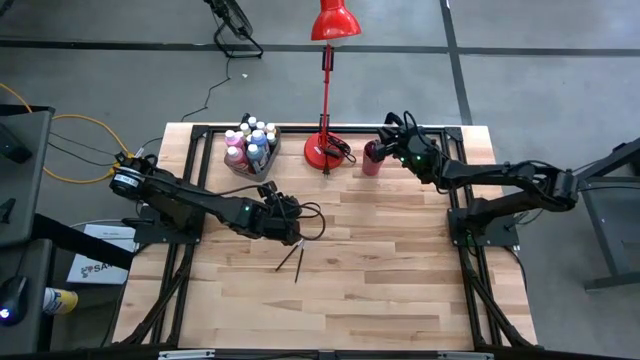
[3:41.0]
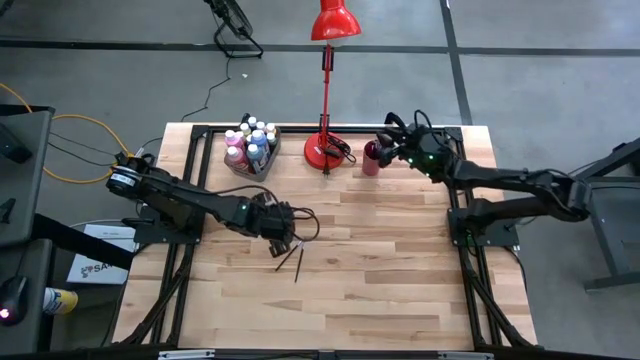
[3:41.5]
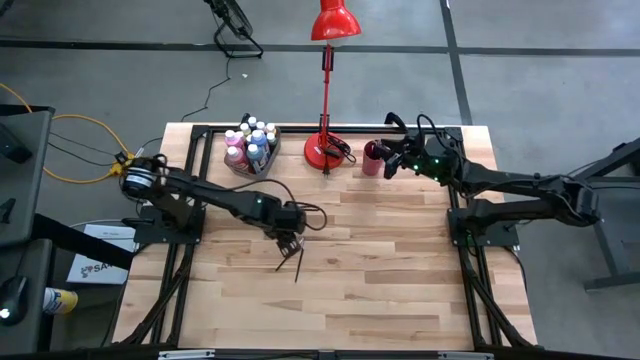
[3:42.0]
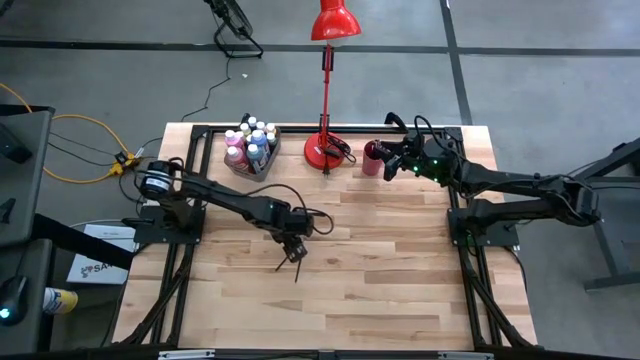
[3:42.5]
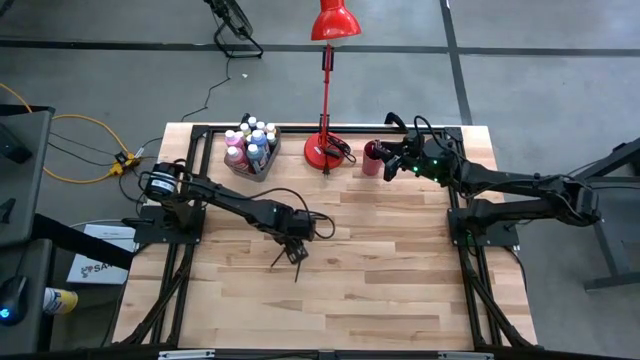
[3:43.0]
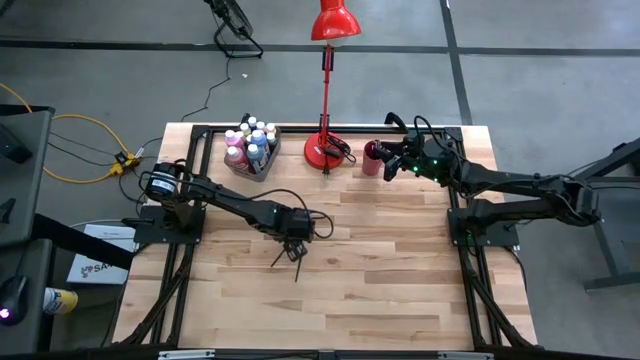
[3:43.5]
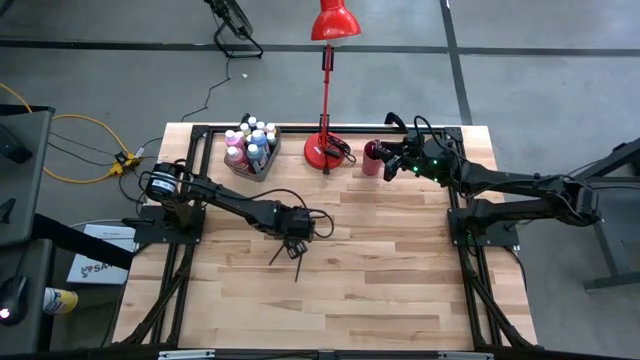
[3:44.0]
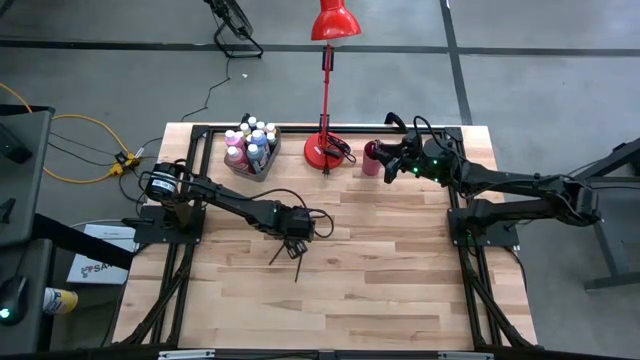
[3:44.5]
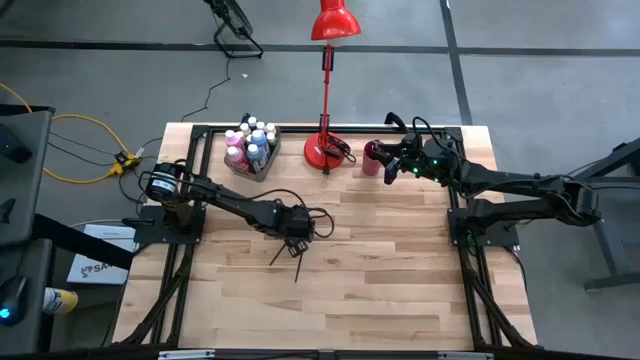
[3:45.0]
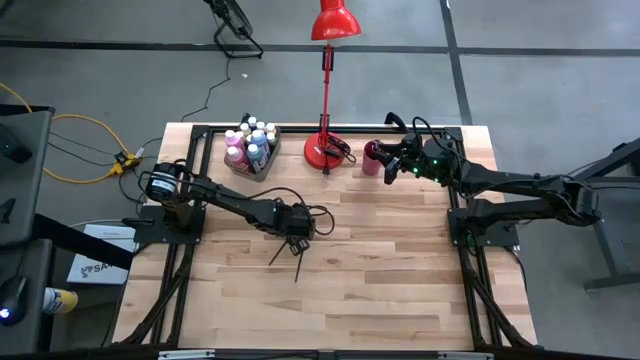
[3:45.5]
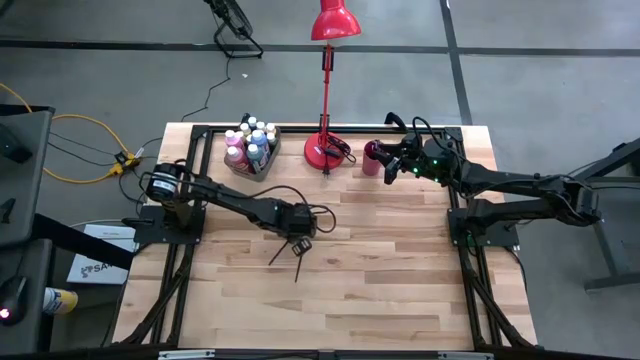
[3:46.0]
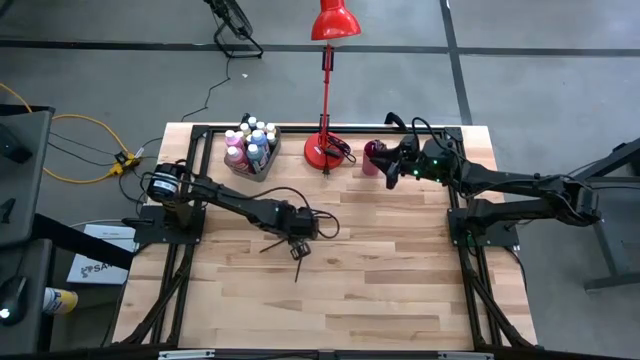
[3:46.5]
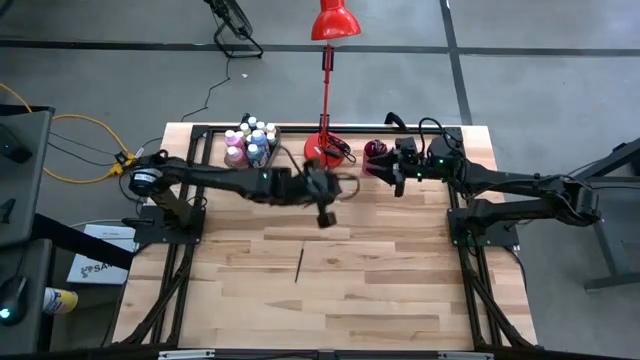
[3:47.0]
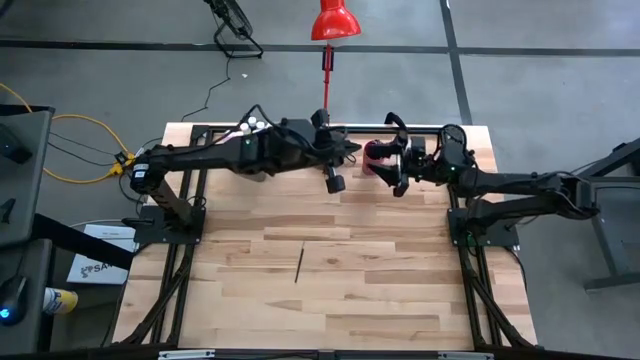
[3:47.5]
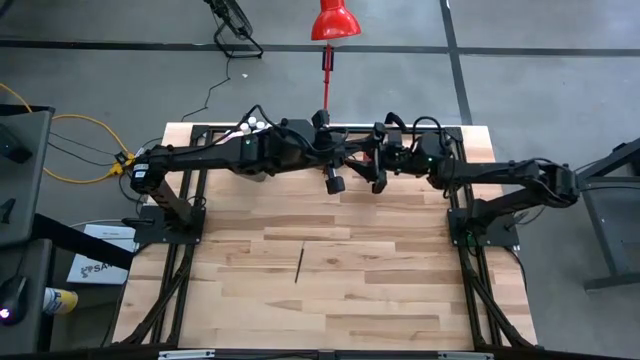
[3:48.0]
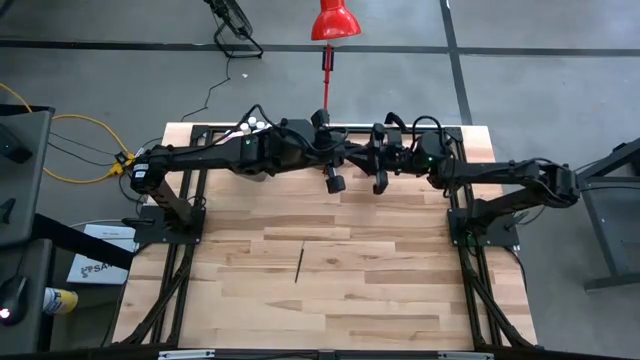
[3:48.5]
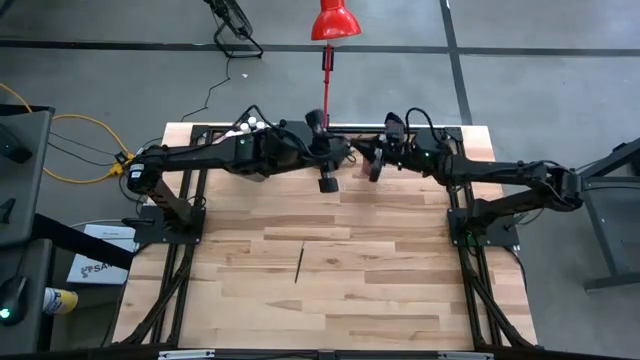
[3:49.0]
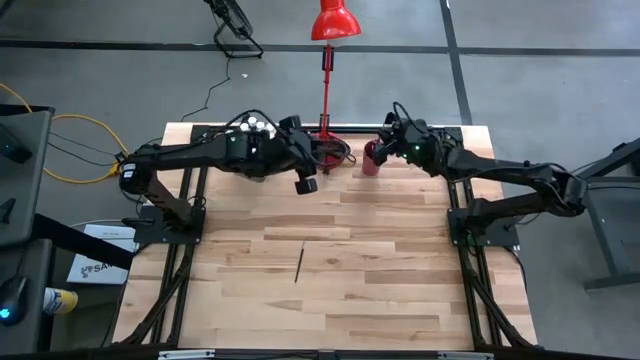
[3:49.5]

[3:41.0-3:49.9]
Task: Pick & Place Paint Supplies
Put the paint brush into the cup

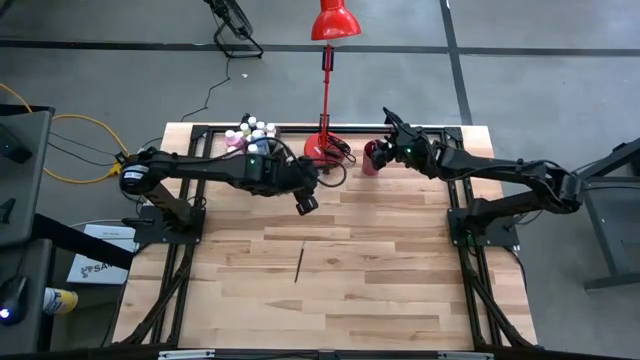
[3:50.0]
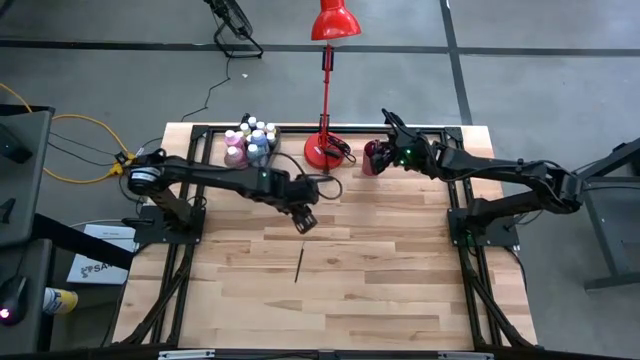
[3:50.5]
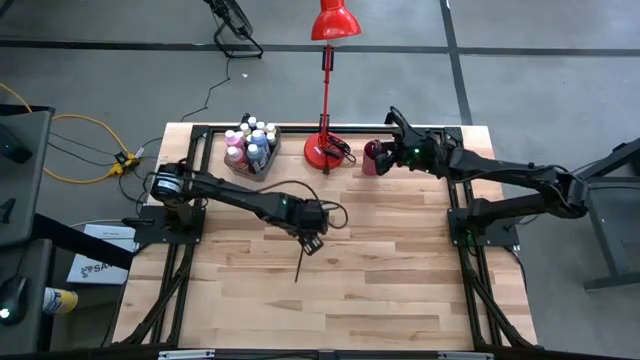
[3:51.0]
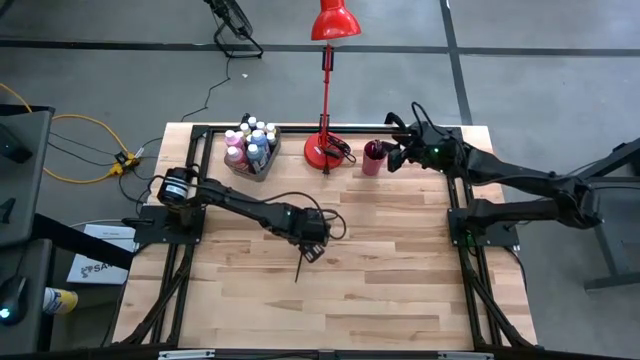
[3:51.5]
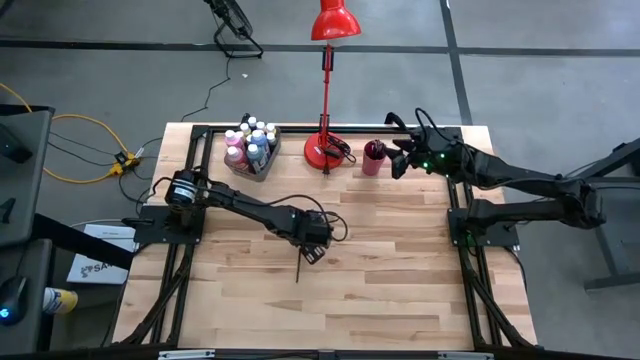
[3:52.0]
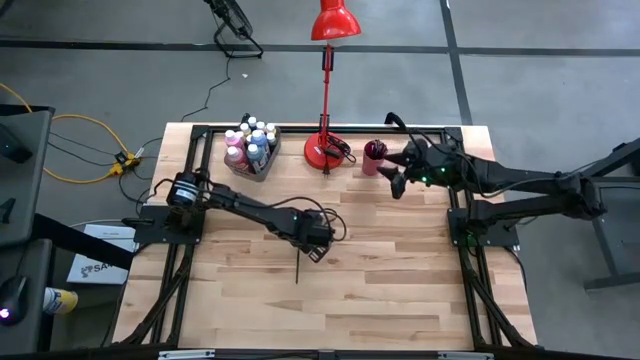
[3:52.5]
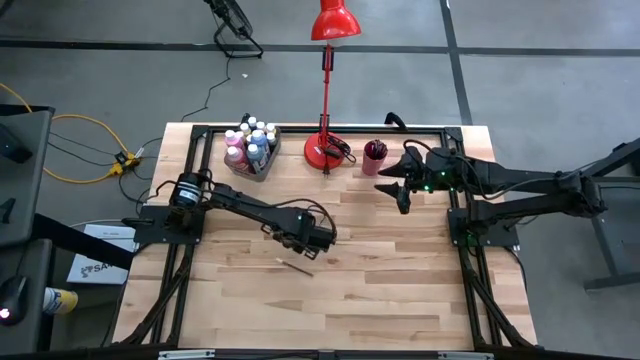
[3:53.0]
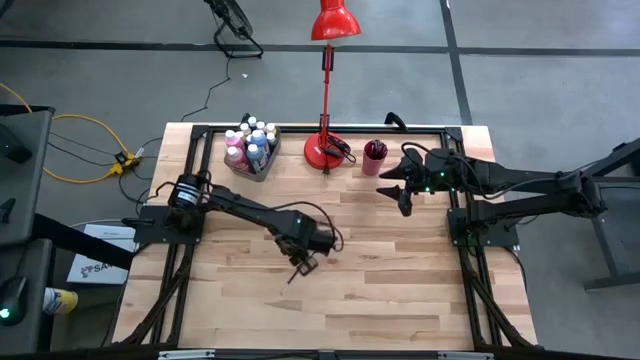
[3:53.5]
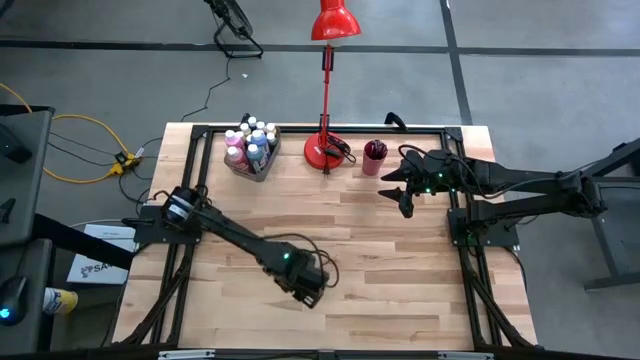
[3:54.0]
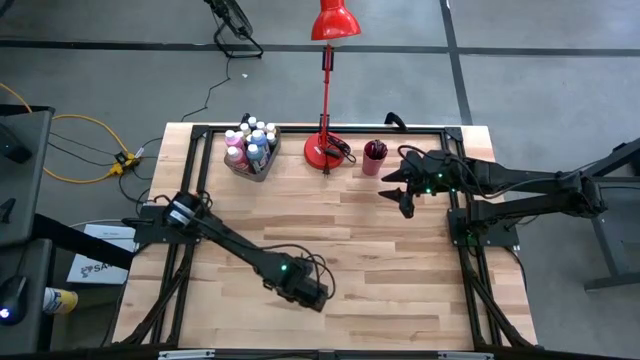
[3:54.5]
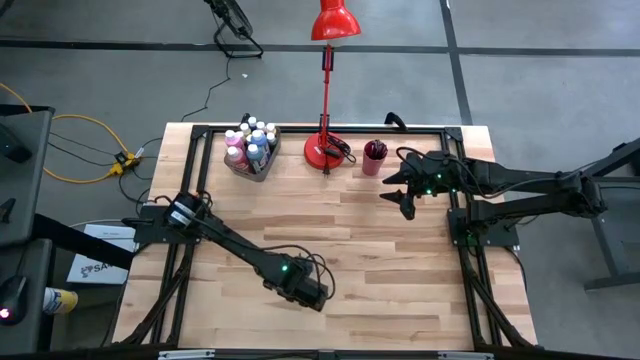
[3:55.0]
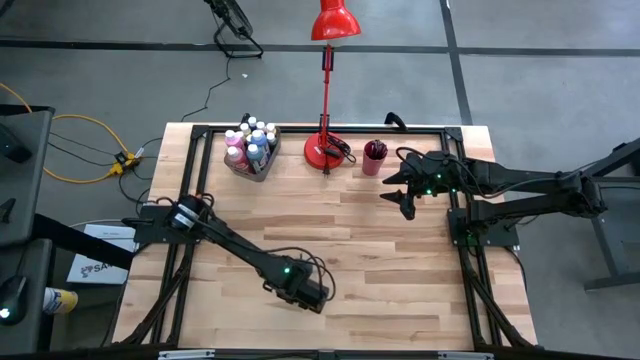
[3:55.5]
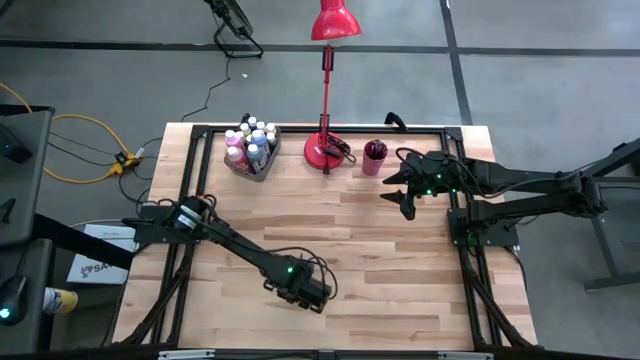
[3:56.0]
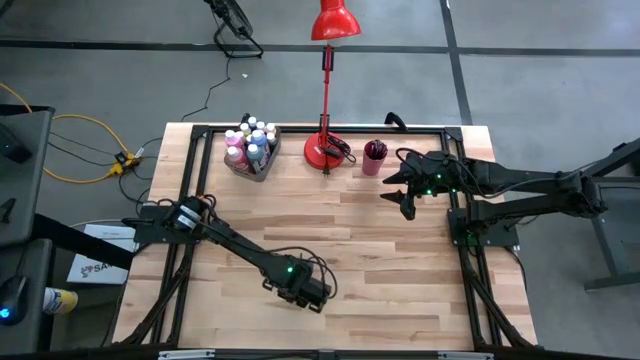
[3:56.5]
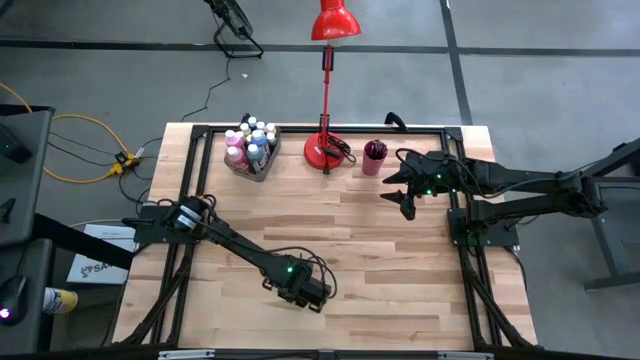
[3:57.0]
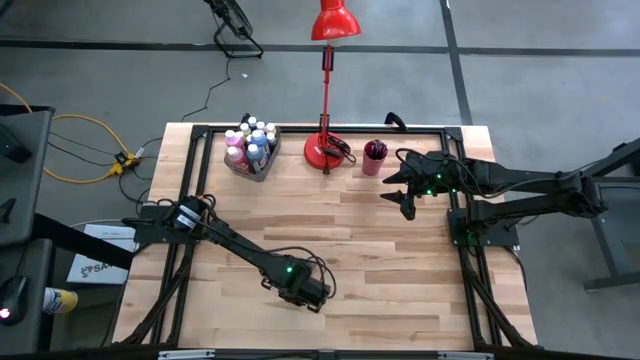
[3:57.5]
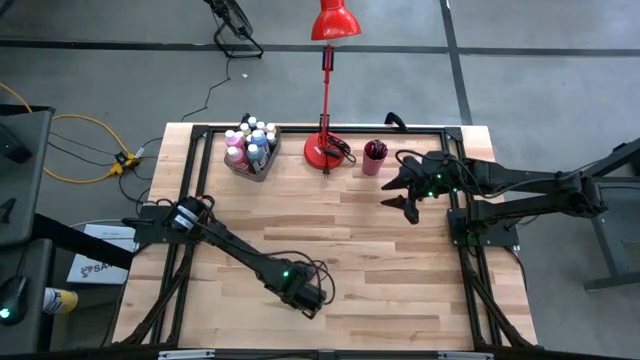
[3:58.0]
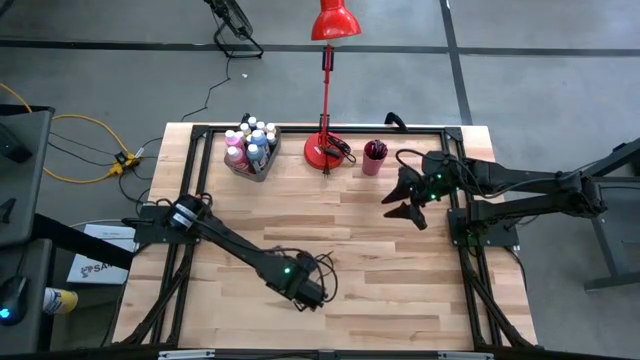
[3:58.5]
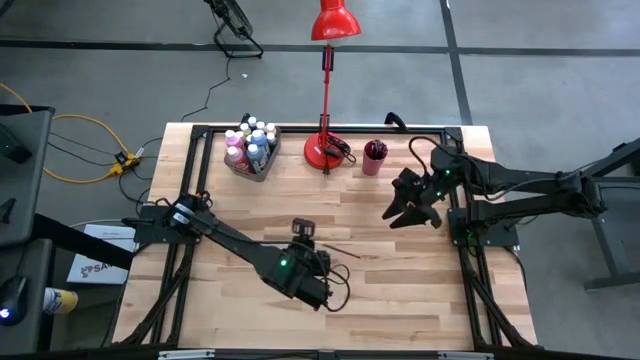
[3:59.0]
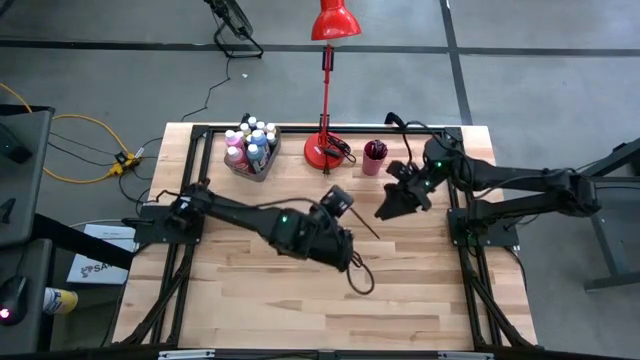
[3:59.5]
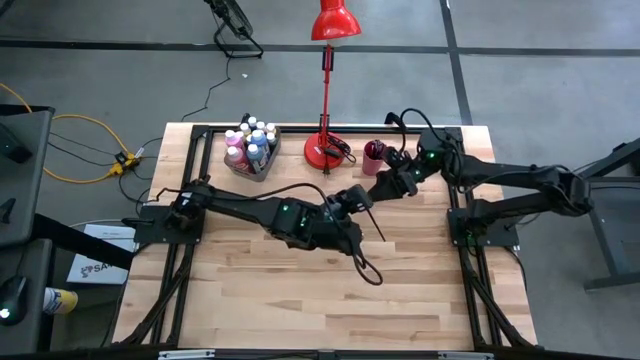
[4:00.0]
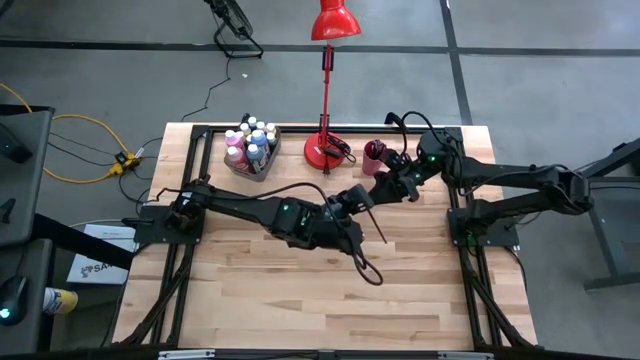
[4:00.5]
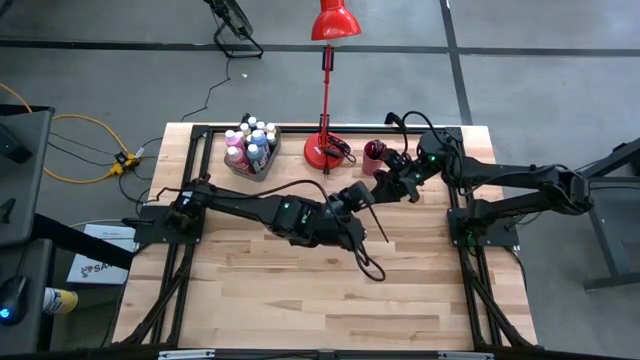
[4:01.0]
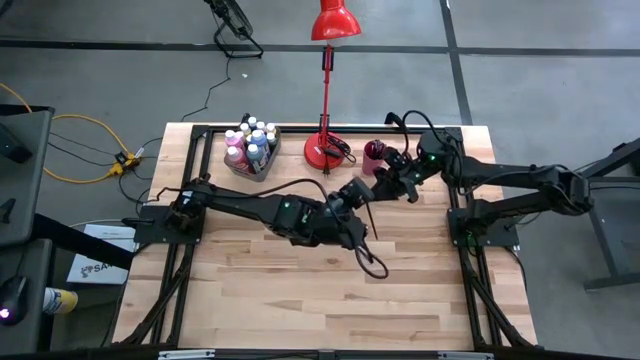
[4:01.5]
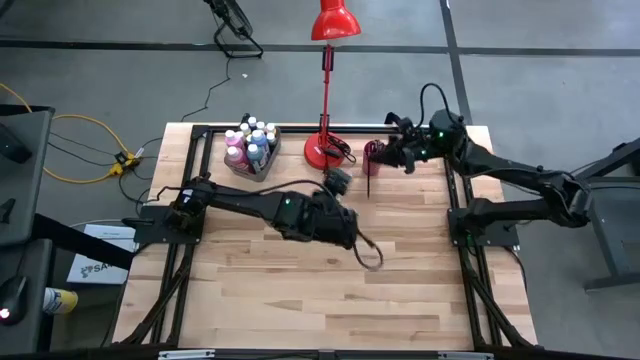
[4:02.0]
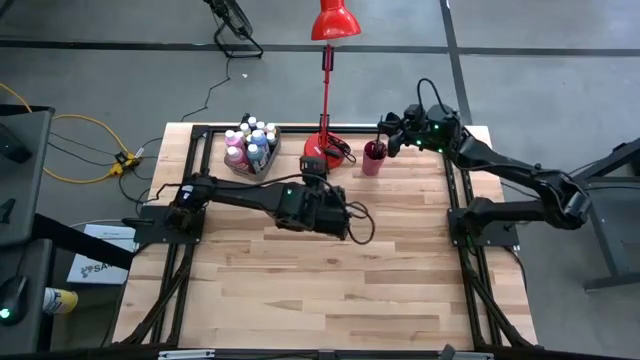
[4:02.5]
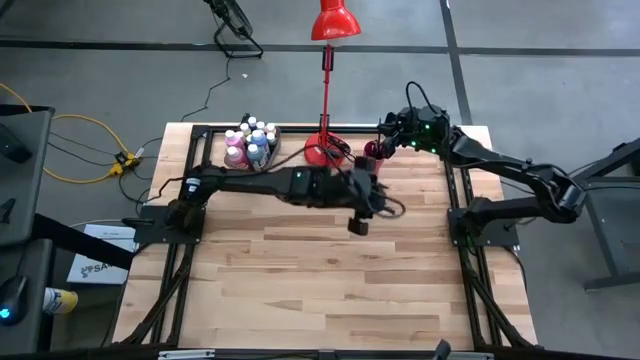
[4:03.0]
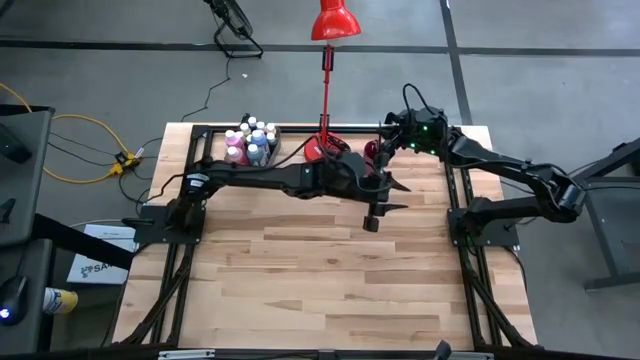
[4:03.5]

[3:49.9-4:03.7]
Put the paint brush into the cup
